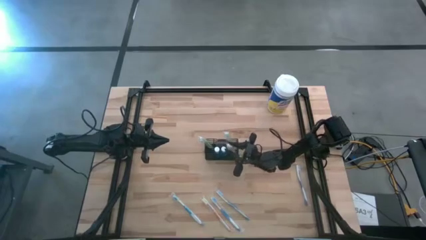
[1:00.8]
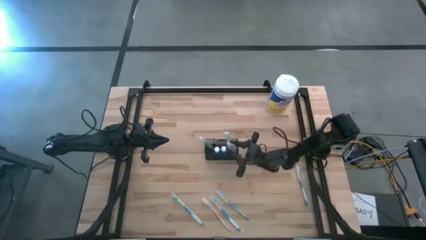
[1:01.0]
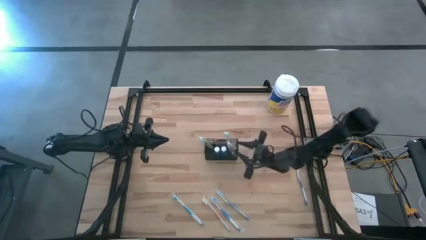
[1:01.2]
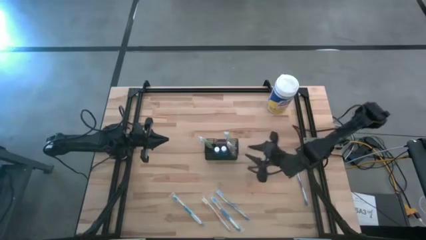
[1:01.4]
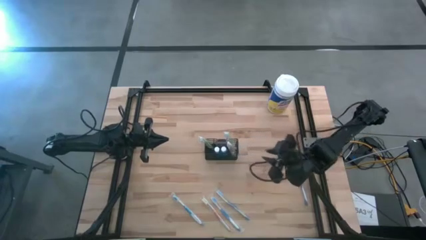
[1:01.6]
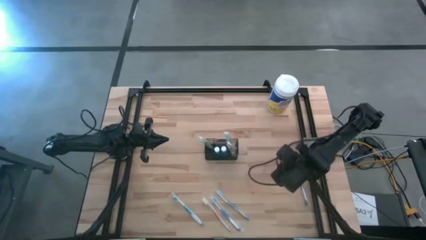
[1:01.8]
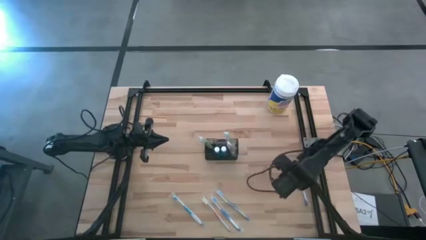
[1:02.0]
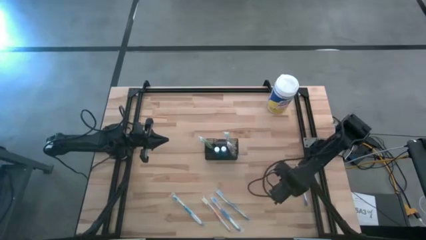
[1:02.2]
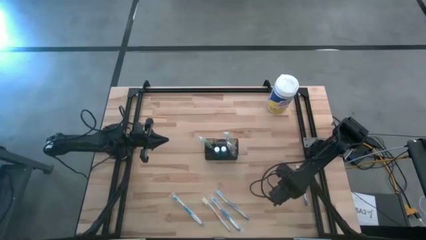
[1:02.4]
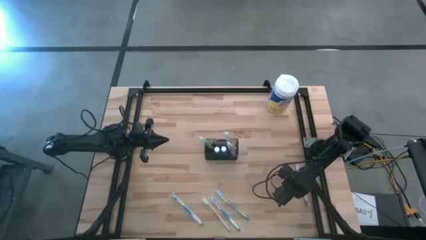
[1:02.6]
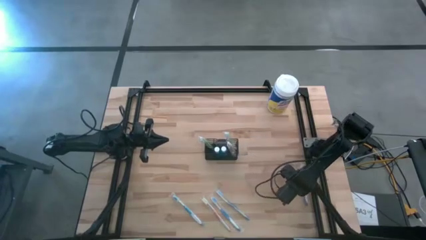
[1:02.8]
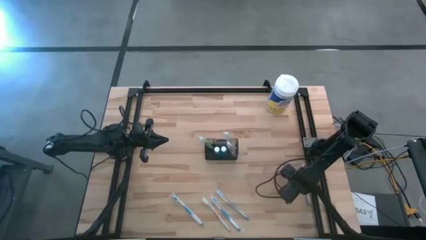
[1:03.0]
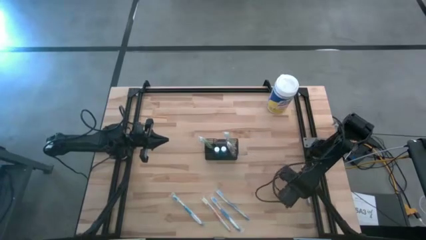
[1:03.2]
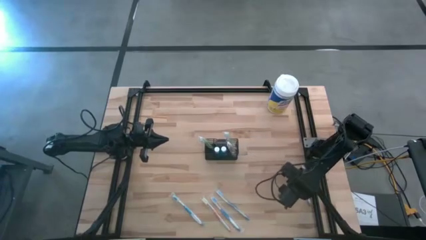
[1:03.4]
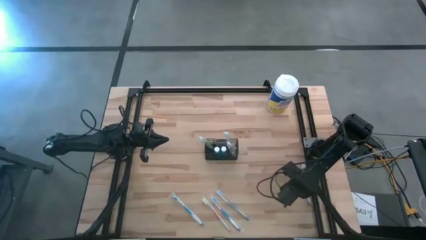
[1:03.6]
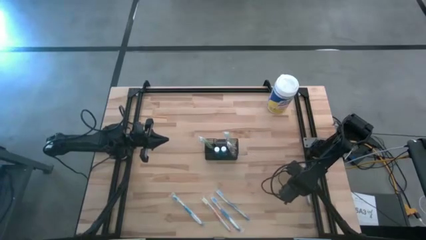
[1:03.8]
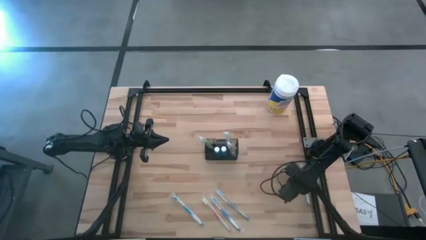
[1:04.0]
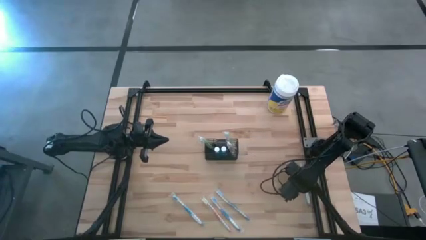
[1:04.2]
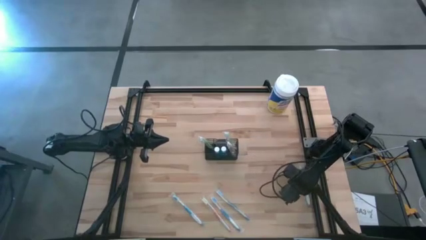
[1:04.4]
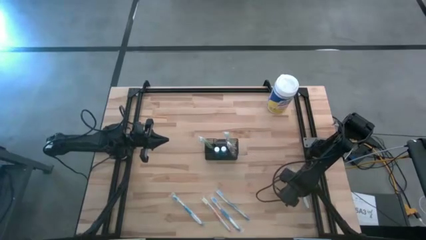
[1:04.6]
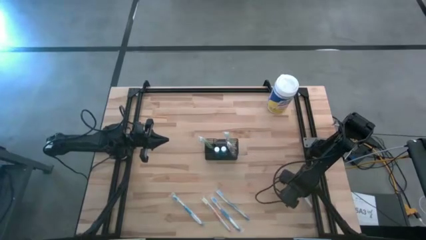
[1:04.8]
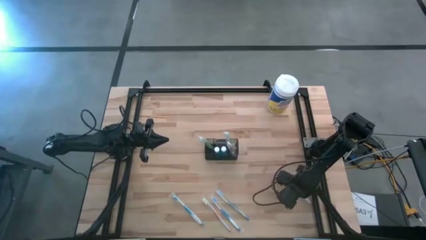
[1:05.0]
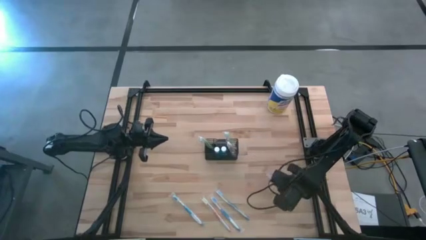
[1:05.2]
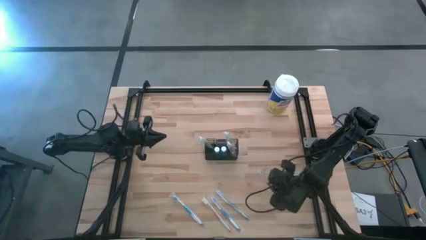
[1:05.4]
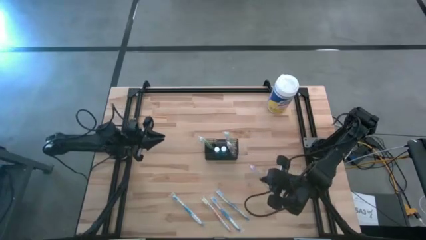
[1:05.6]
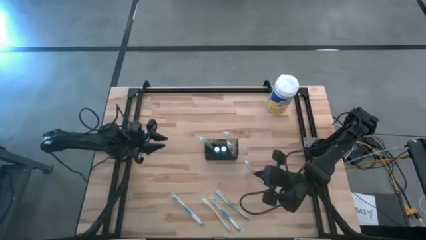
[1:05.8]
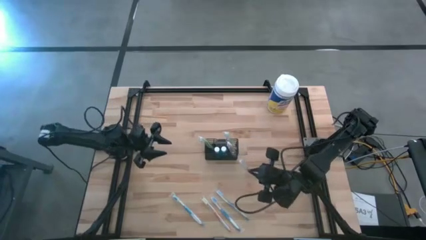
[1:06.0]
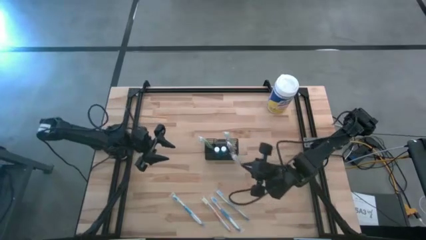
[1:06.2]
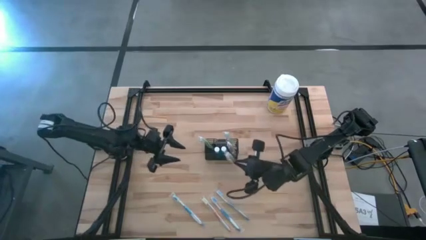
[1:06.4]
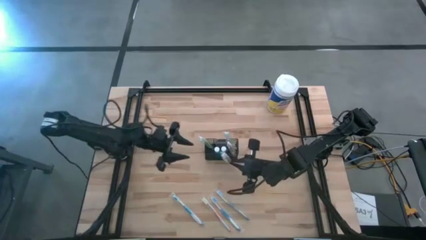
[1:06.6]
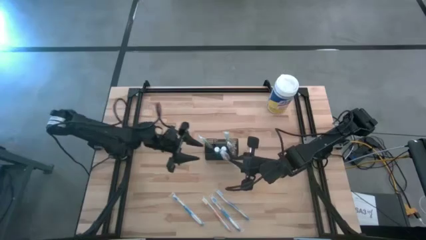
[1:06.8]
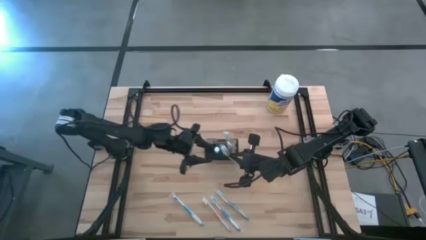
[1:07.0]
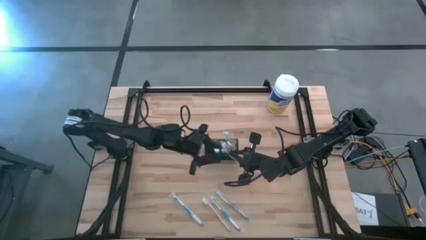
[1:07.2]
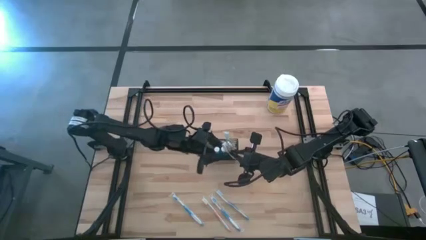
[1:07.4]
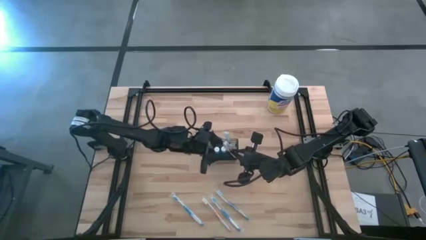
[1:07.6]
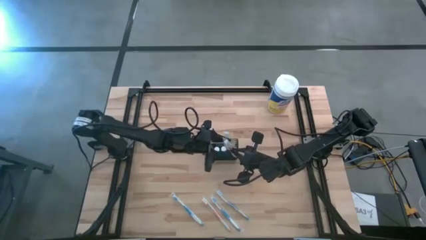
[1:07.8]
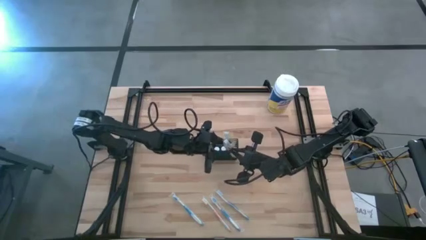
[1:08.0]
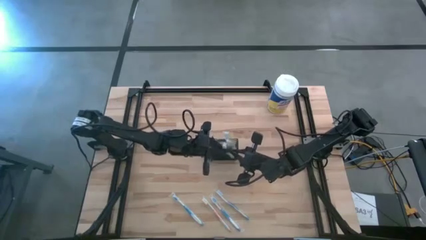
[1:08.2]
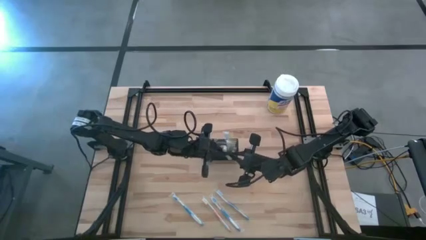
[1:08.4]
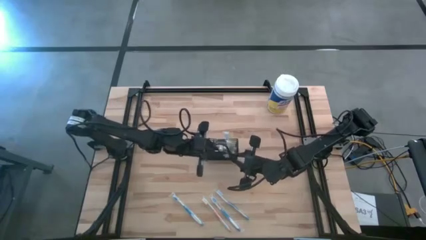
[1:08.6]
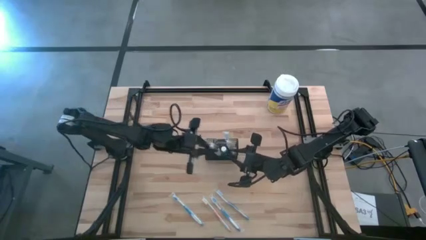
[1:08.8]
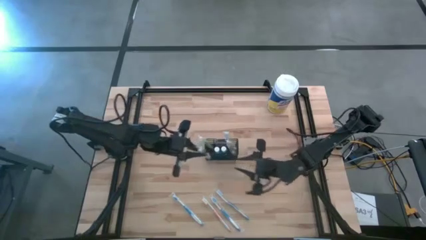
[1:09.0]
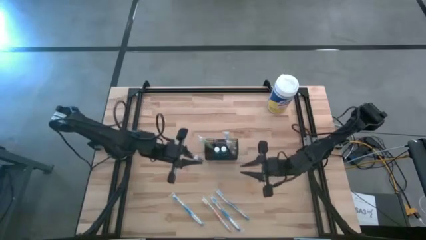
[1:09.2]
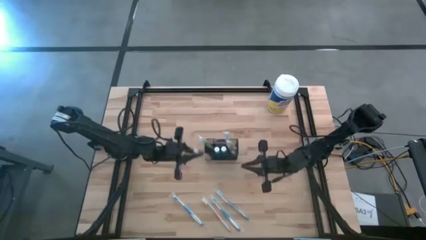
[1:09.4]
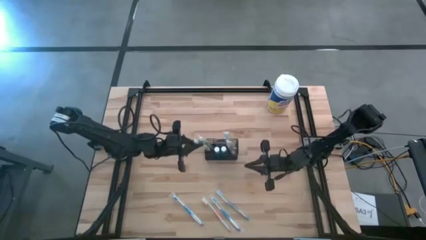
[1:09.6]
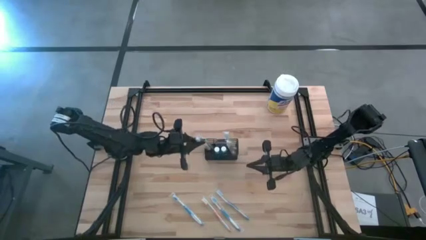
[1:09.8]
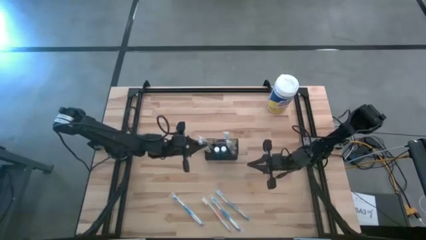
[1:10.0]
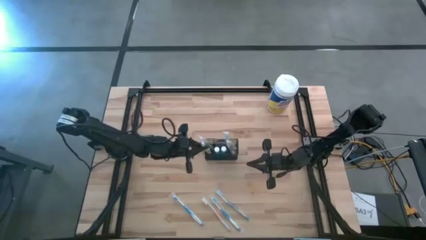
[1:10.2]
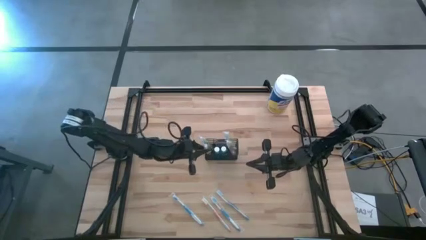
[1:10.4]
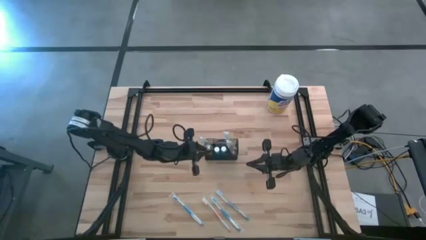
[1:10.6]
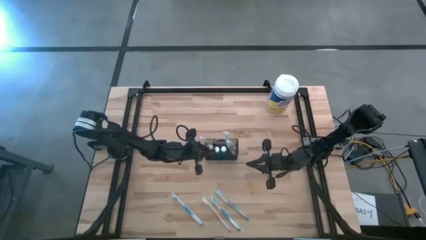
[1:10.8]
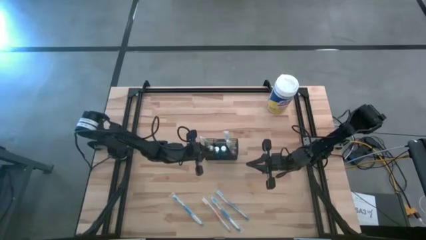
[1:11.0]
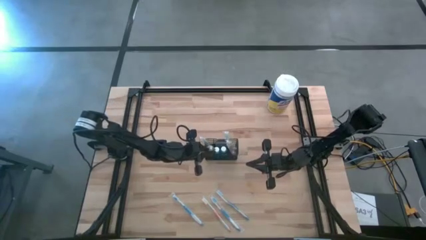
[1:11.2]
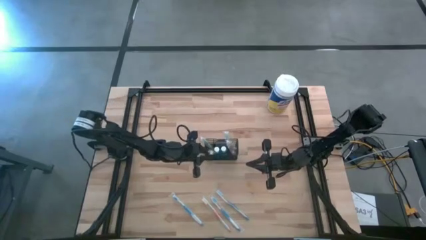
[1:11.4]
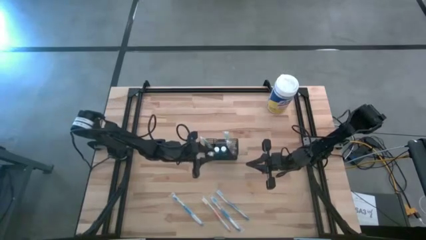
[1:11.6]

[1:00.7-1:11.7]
Task: Pick & Place toothbrushing station
Put the purple toothbrush into the black organizer

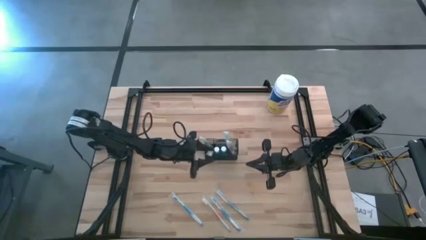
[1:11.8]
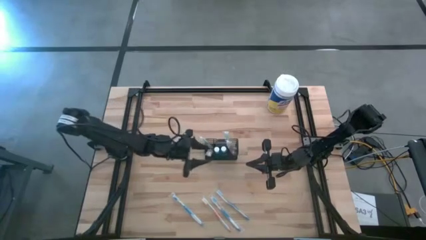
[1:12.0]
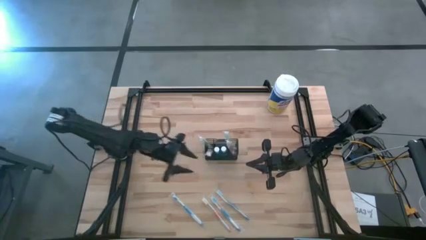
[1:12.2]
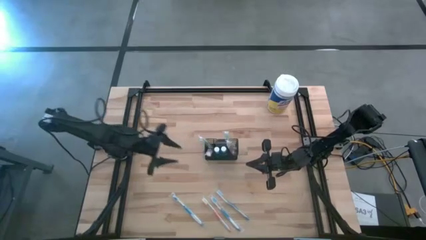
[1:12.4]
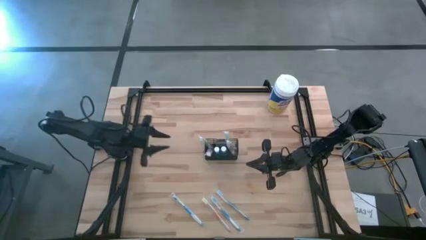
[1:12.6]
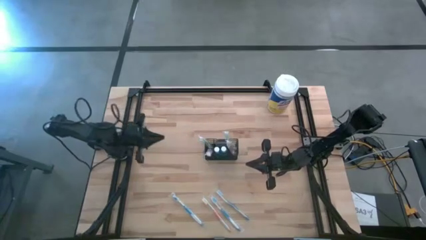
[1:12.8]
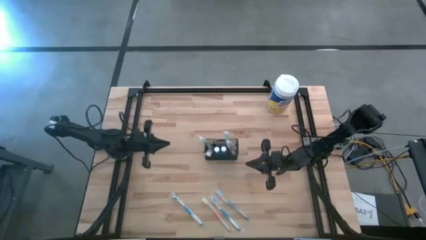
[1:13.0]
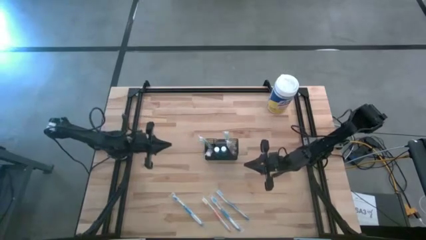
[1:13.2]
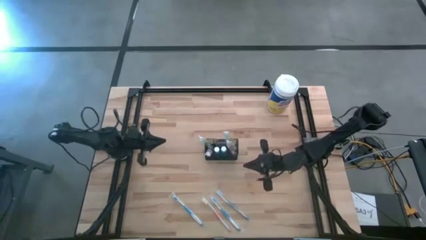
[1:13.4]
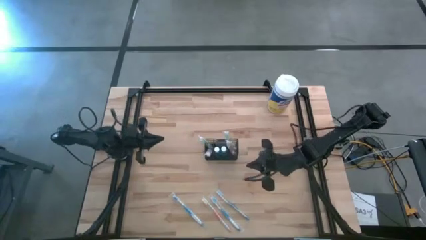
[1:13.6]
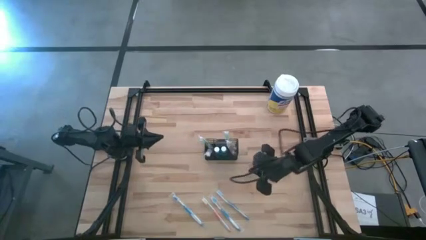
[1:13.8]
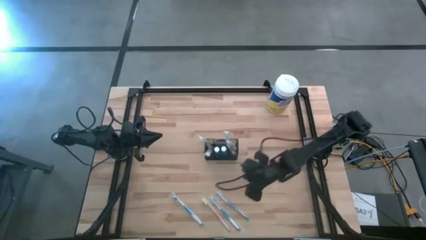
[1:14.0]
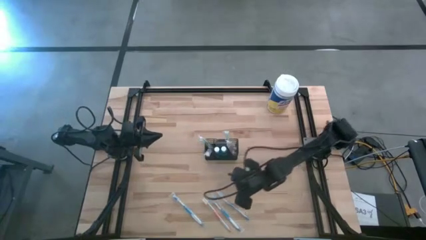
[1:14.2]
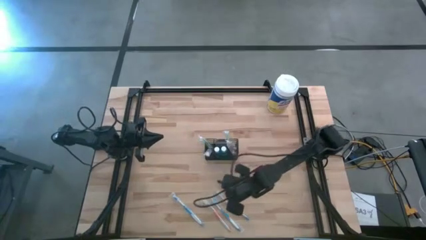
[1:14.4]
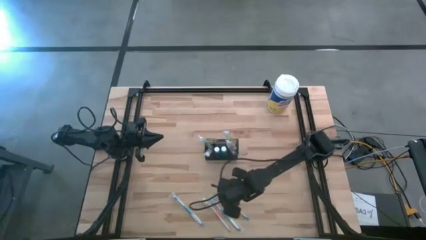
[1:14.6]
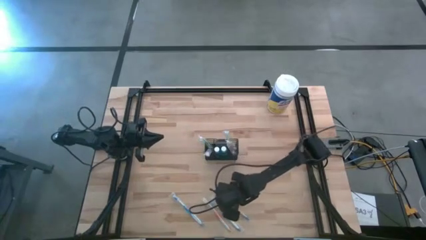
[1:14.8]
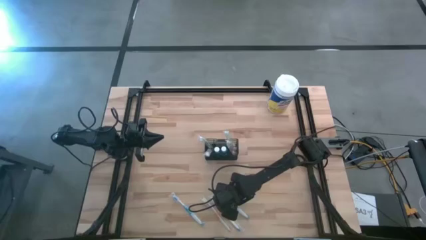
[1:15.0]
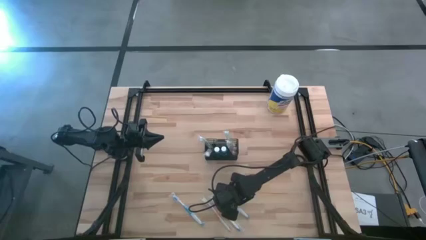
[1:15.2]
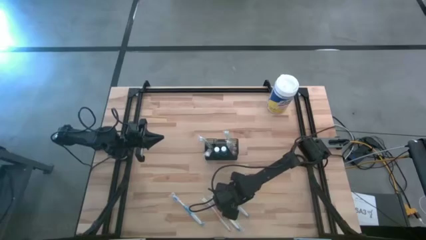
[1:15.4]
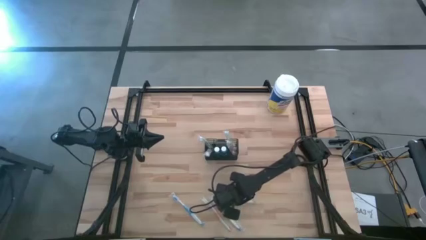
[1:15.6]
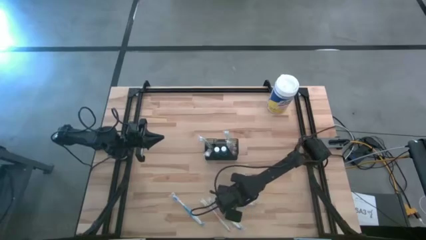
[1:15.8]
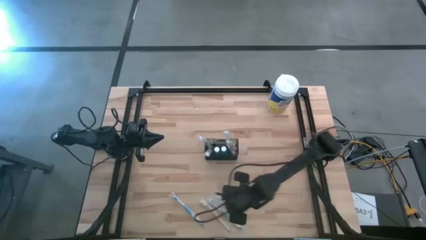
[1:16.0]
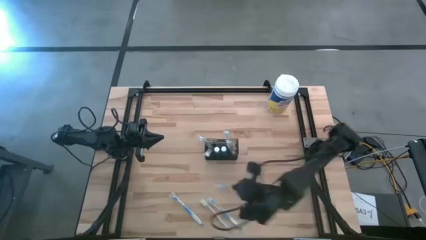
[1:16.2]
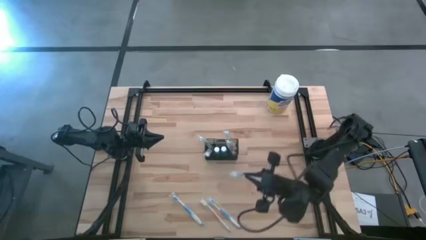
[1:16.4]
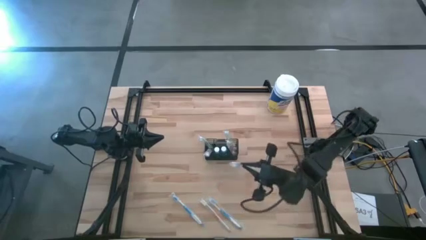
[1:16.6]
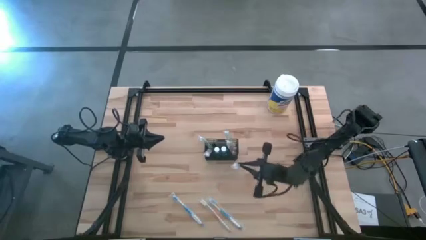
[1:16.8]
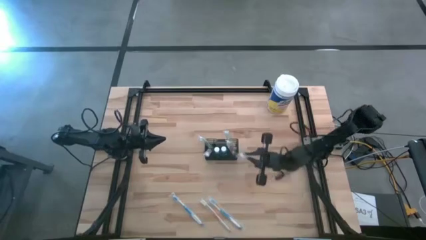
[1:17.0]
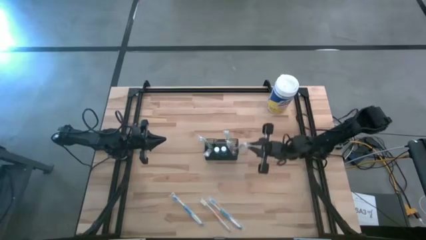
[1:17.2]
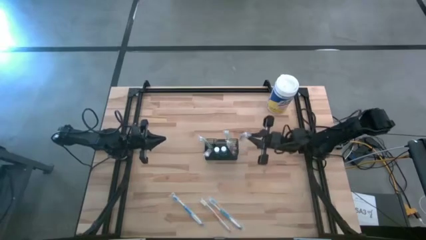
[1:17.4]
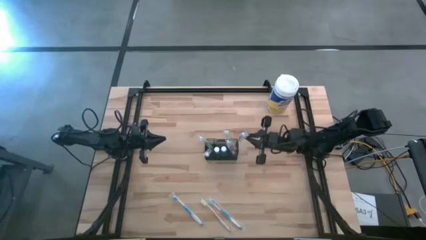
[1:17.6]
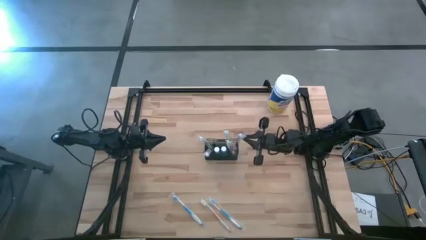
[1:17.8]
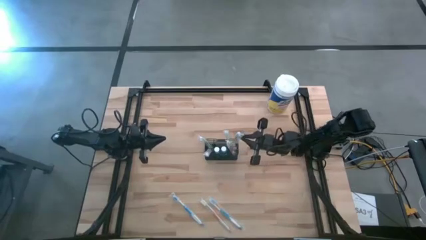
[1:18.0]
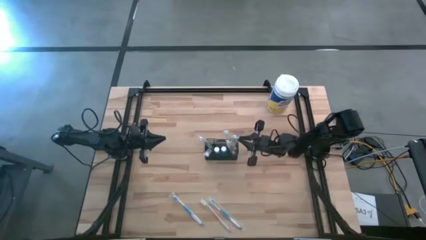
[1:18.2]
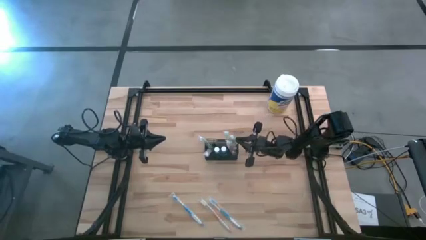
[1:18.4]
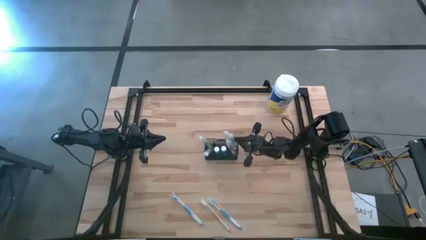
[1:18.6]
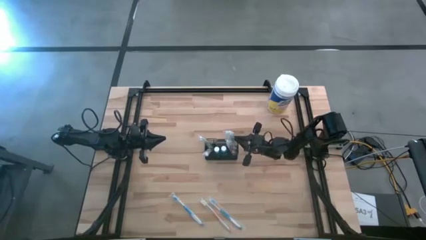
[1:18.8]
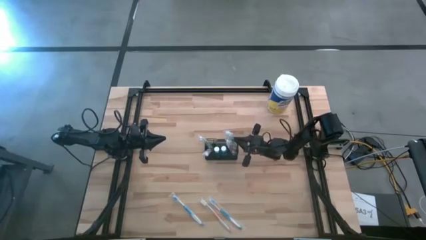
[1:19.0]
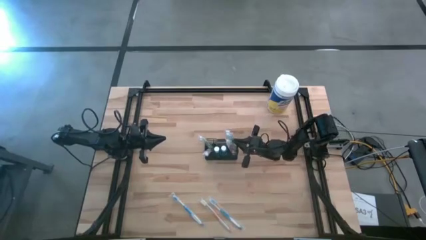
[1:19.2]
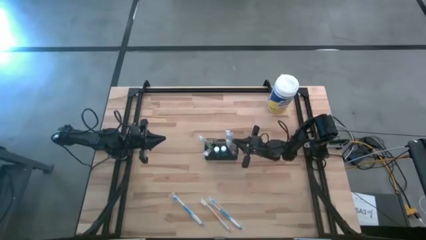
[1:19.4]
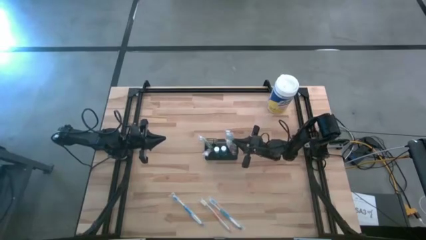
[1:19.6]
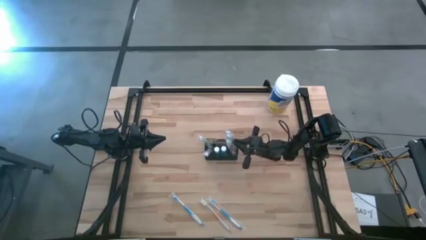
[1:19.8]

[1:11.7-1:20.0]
Put the blue toothbrush into the black organizer
